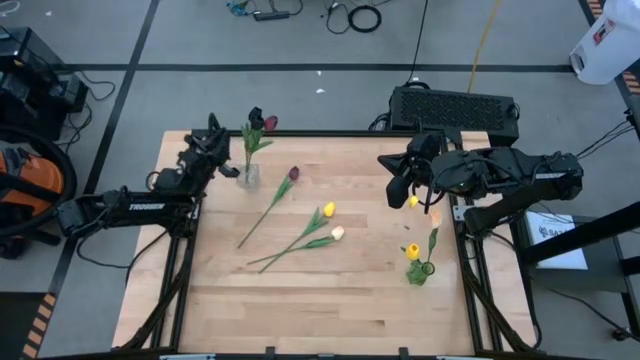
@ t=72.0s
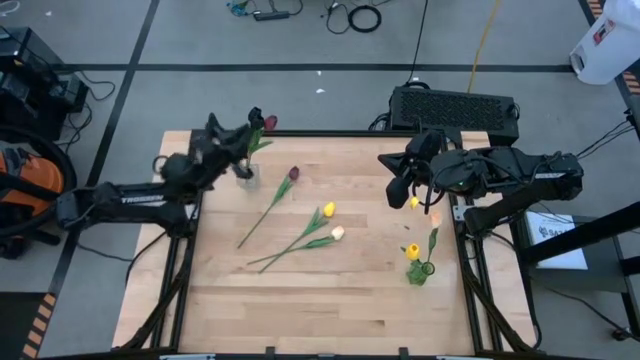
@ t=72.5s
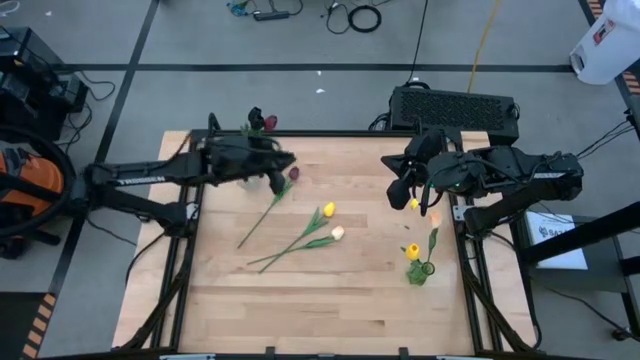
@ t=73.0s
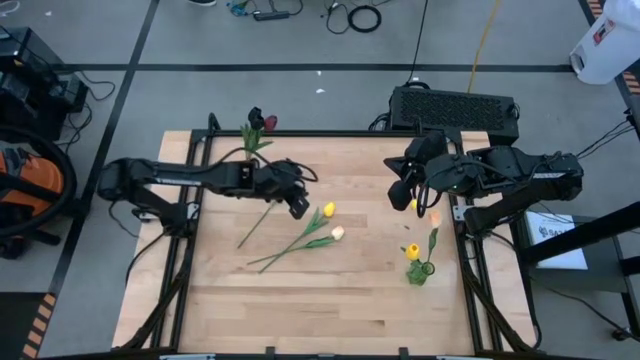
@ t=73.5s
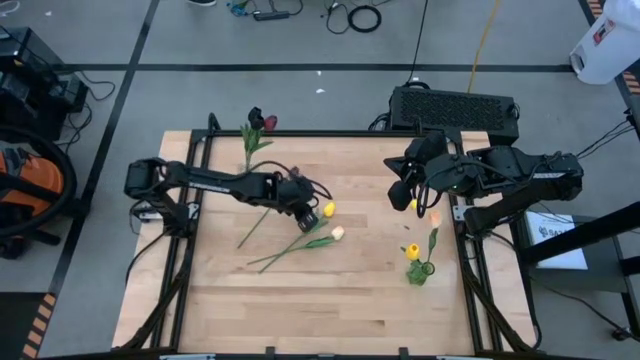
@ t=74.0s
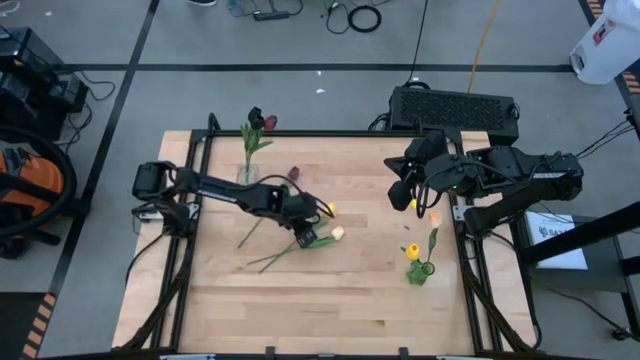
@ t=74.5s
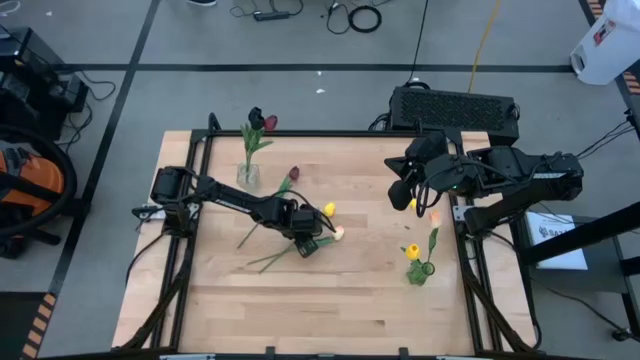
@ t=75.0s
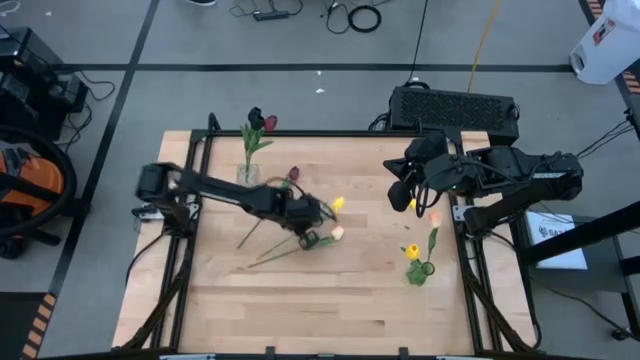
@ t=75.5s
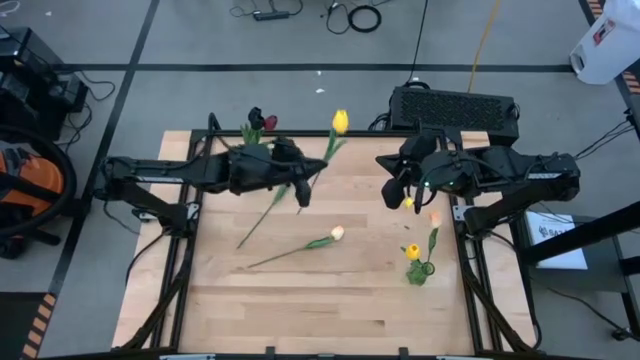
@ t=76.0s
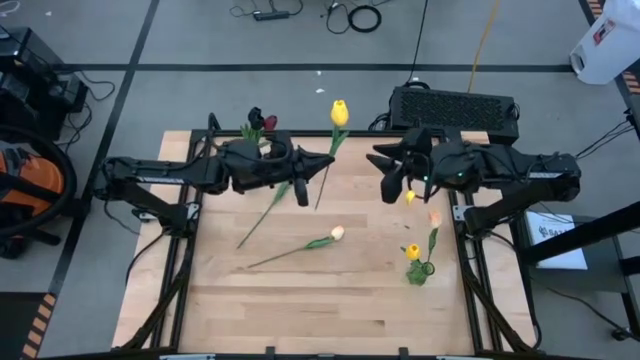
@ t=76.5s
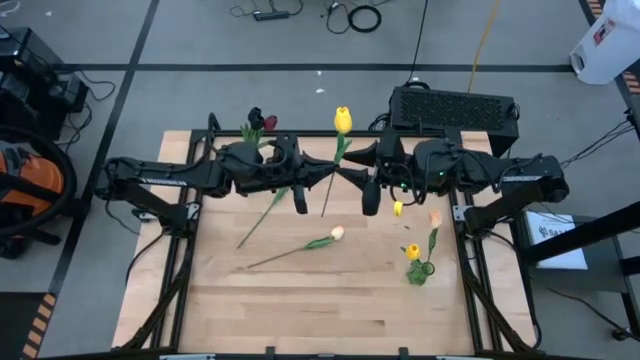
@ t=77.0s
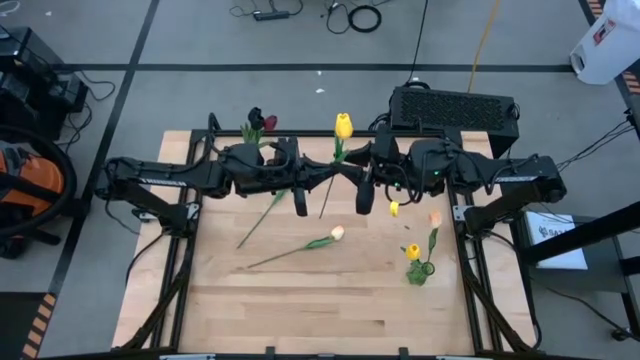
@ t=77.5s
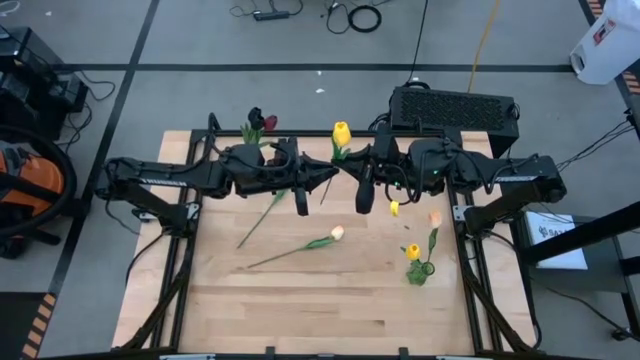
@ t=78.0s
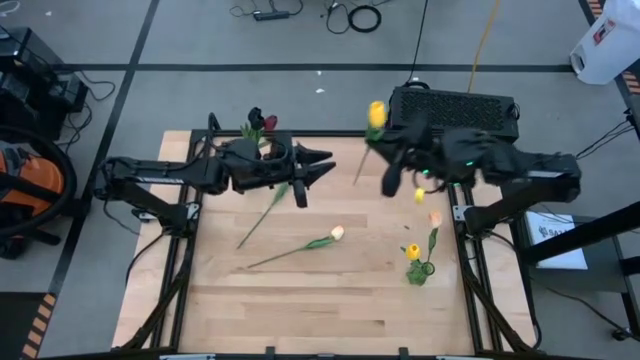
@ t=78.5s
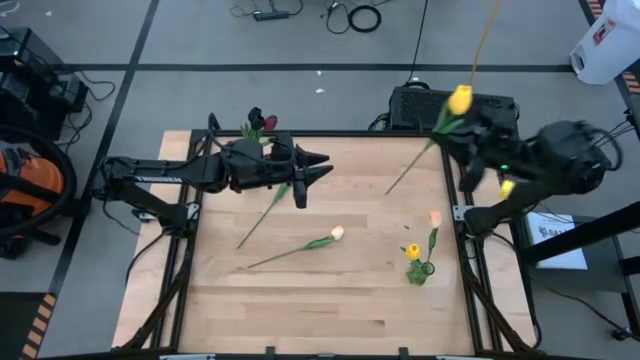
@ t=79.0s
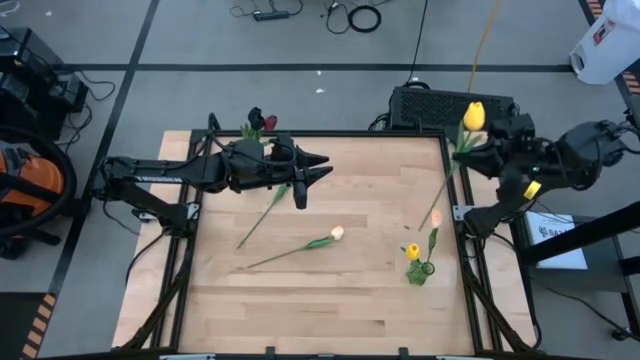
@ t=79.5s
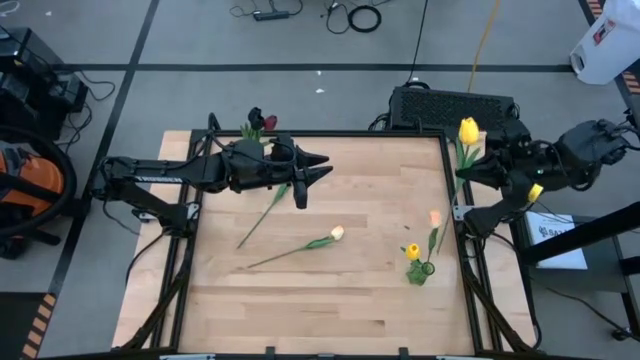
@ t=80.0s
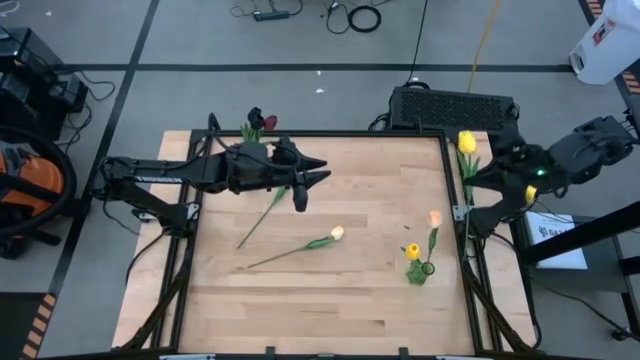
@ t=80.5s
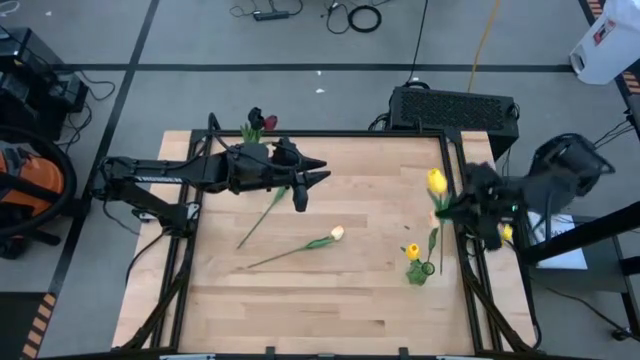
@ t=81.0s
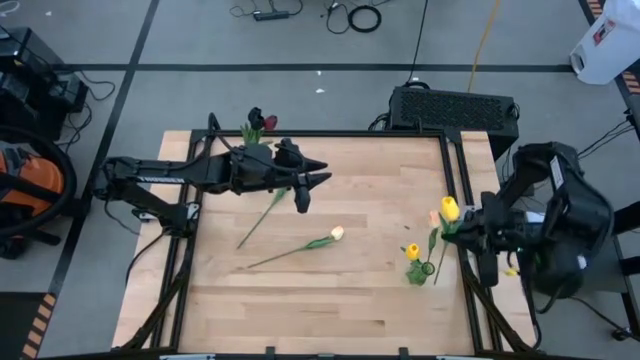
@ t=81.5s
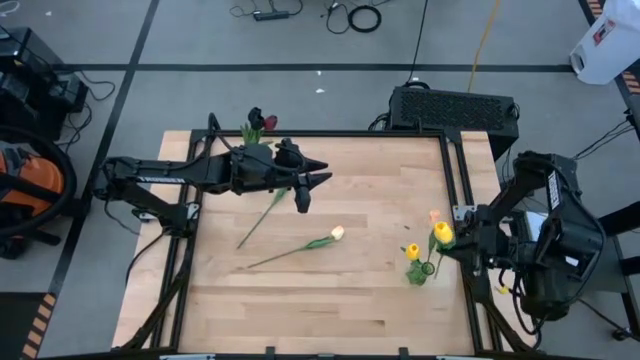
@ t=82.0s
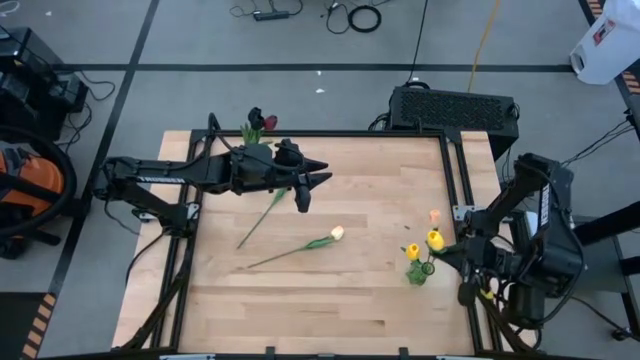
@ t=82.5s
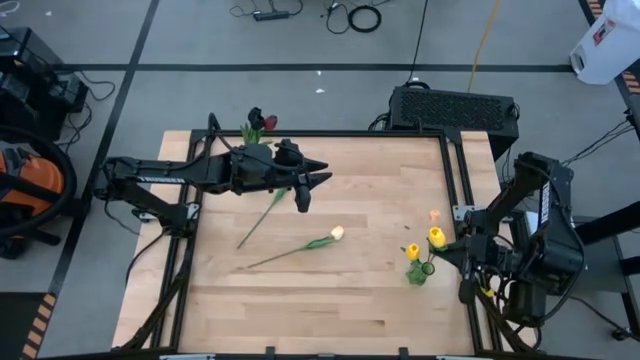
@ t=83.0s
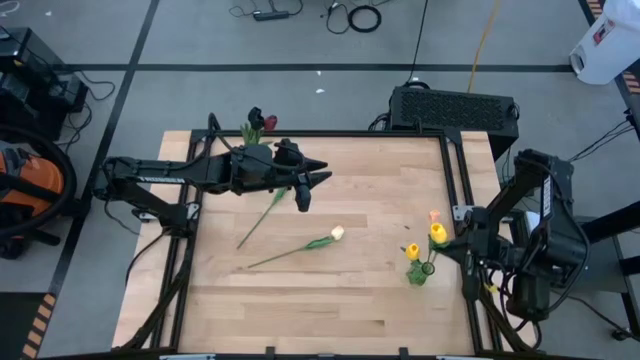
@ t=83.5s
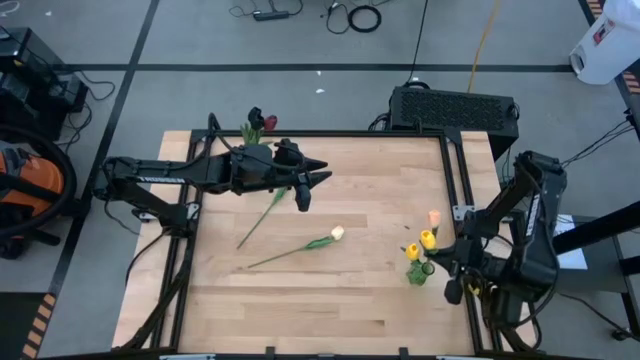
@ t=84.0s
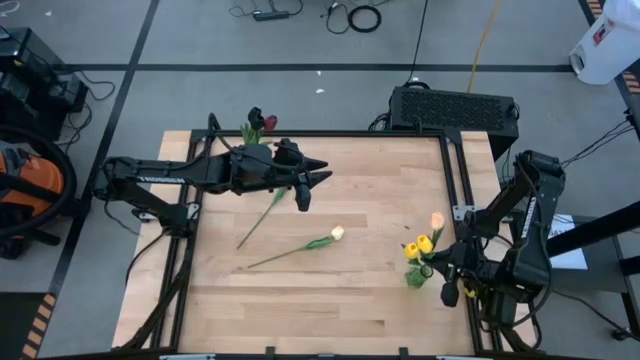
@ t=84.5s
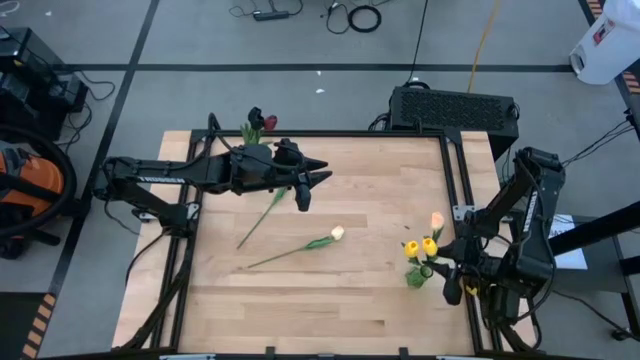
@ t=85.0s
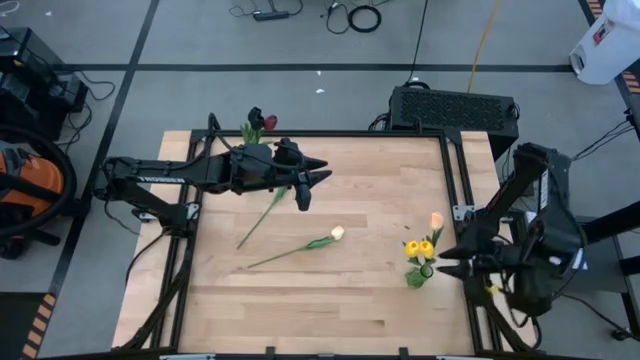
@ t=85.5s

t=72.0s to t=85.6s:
Task: Sort flowers into vase by color
Put the yellow flower into the transparent green vase

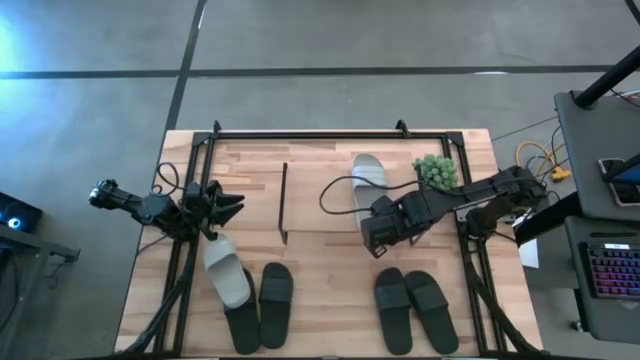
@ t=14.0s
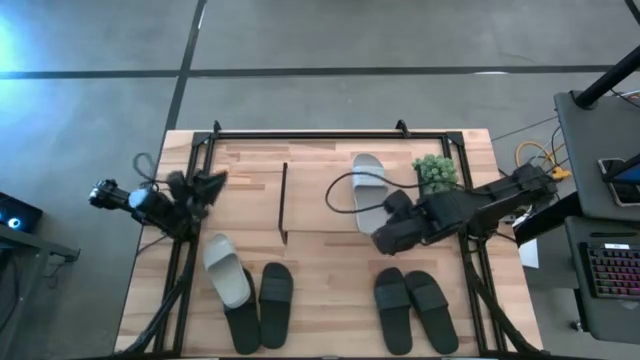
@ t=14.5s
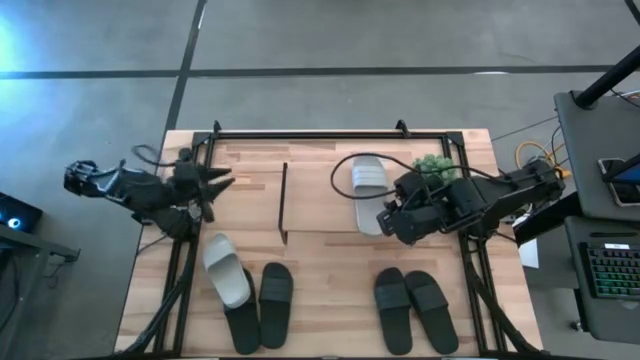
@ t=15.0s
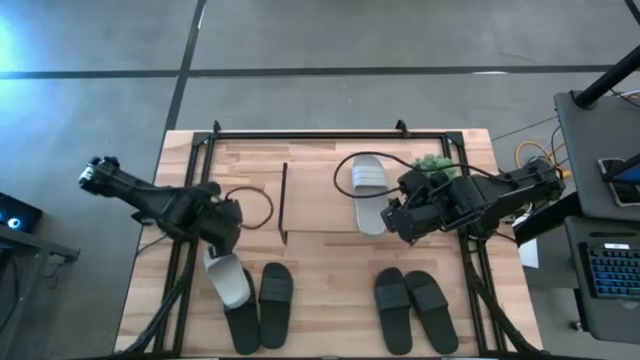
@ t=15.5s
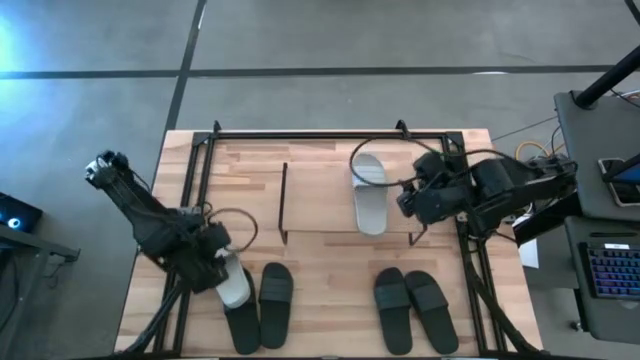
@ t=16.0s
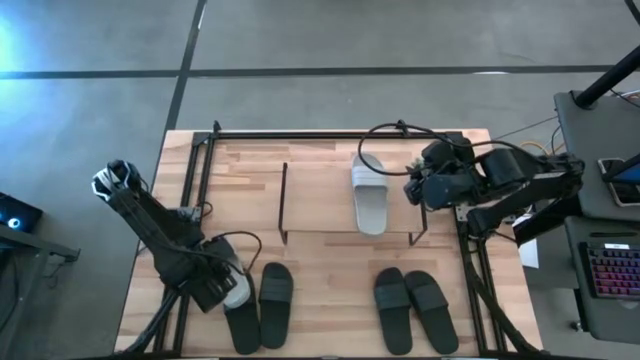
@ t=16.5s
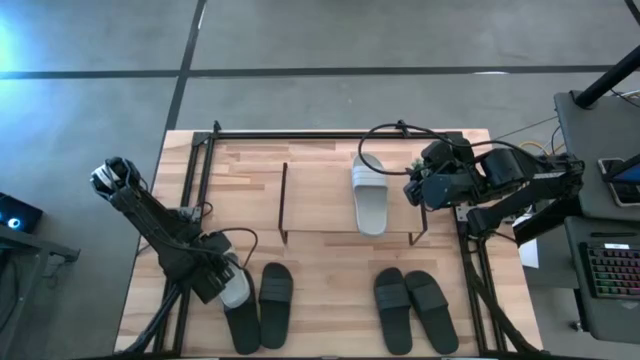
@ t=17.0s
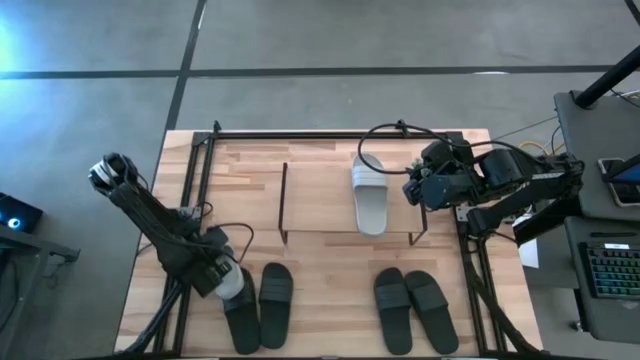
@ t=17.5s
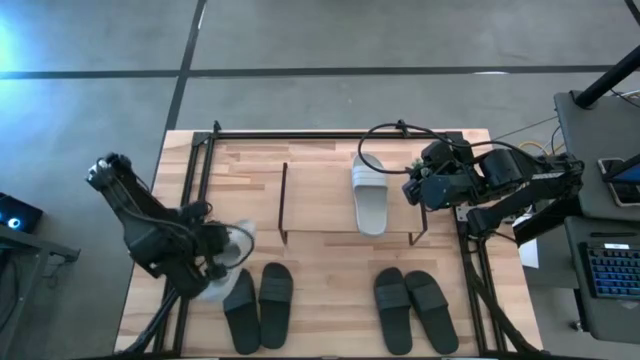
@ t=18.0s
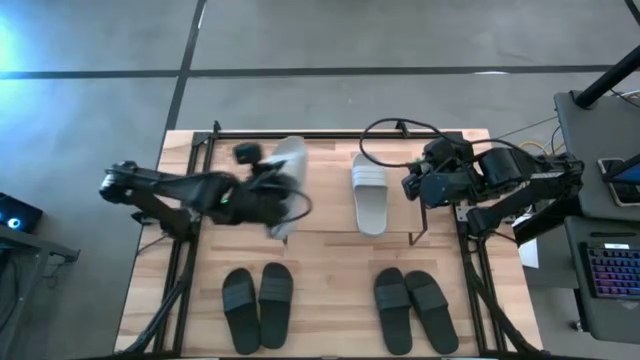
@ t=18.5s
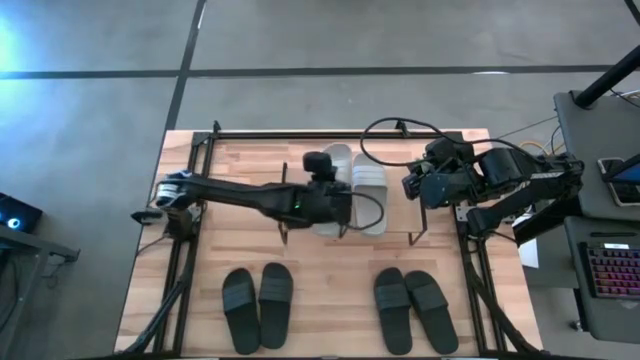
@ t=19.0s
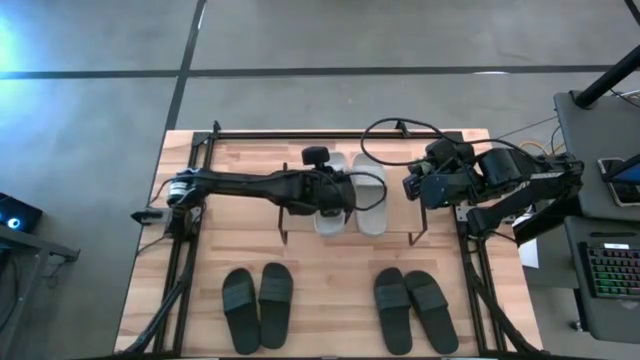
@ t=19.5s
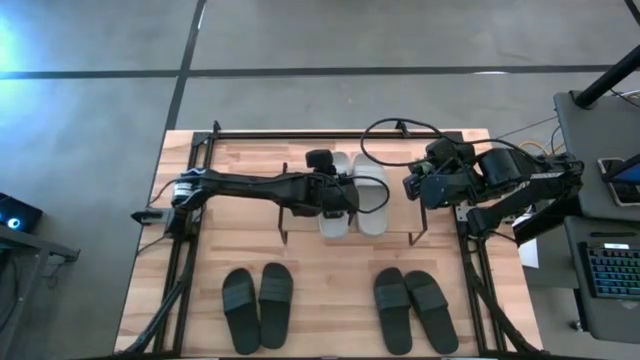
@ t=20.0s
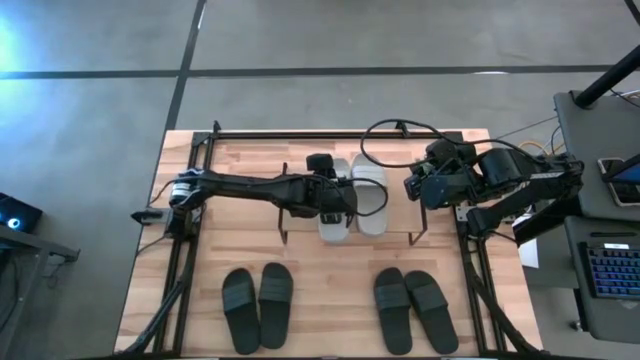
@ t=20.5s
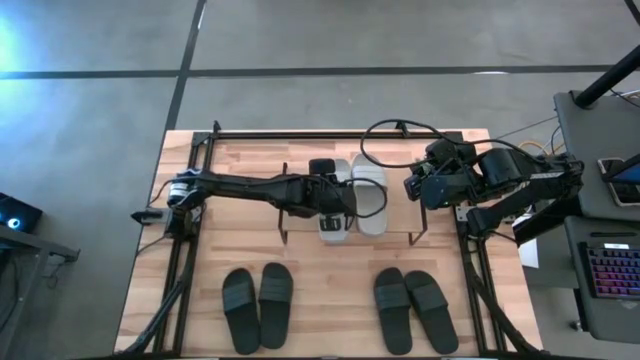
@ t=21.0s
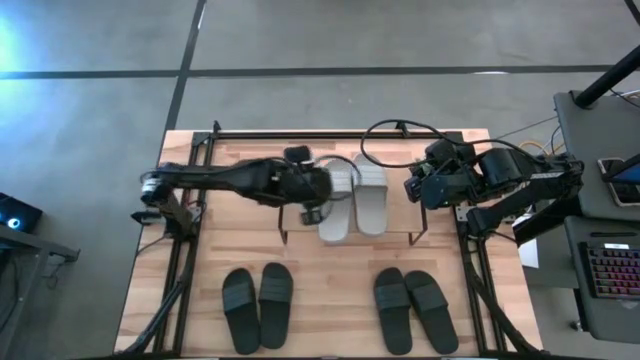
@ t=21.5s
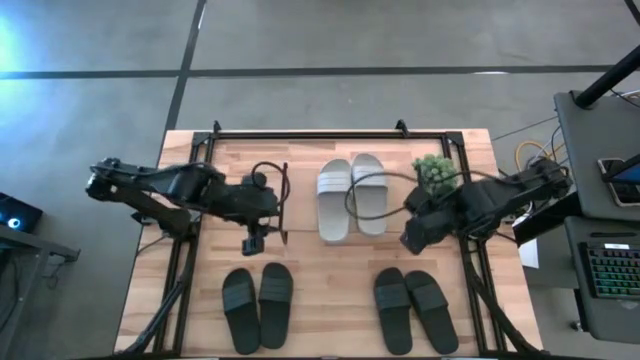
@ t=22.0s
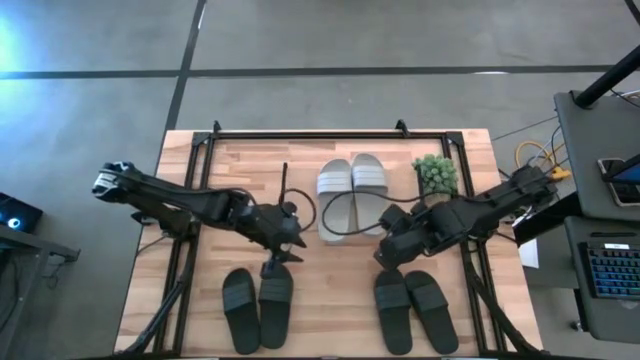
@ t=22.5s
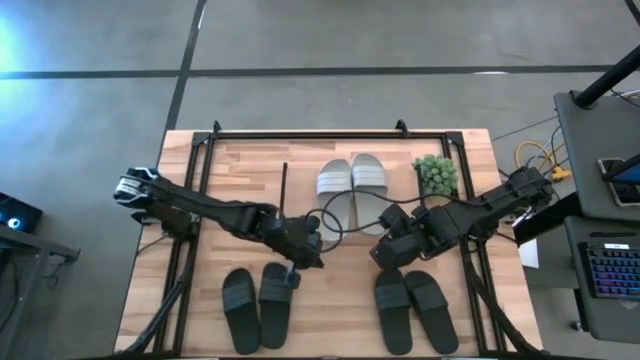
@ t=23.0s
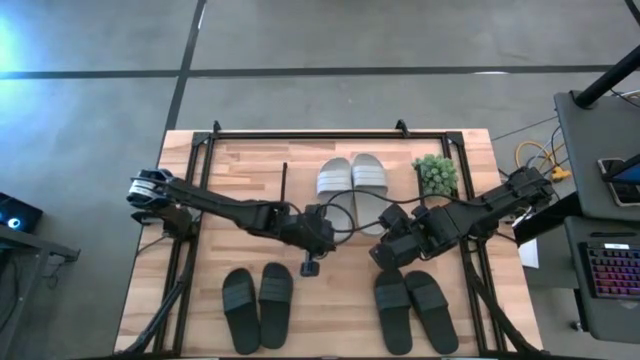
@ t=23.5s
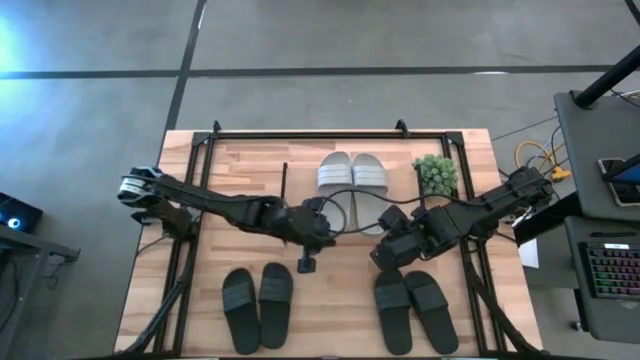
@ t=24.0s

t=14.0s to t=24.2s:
Task: Pick and place slides into the shelf
Put the gray slide on the shelf
